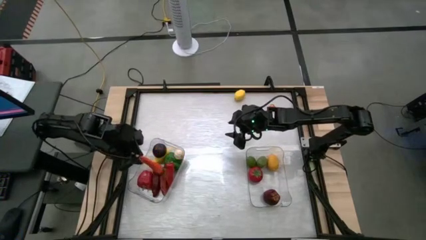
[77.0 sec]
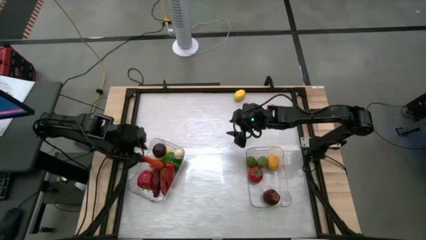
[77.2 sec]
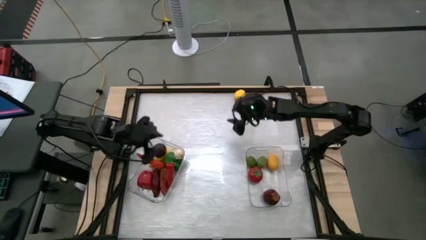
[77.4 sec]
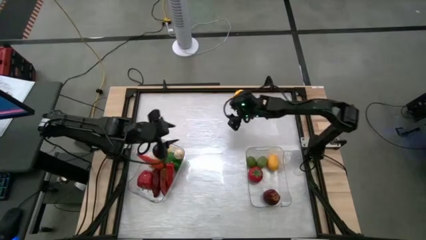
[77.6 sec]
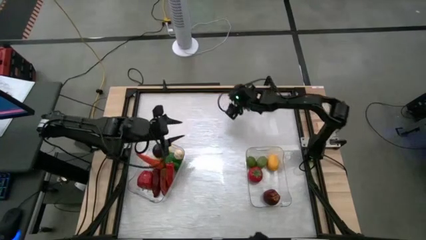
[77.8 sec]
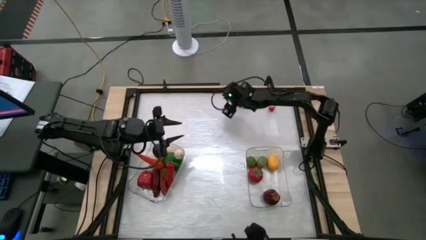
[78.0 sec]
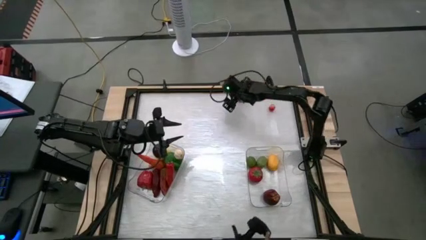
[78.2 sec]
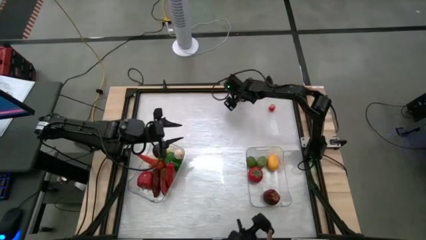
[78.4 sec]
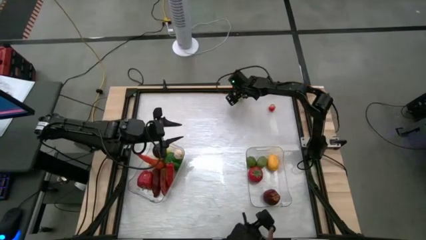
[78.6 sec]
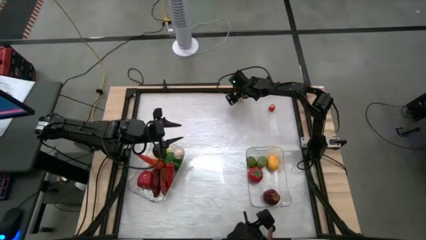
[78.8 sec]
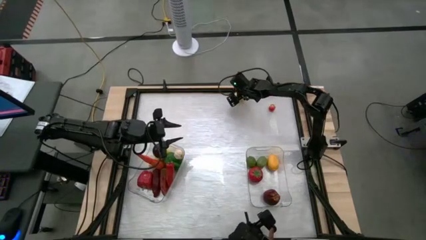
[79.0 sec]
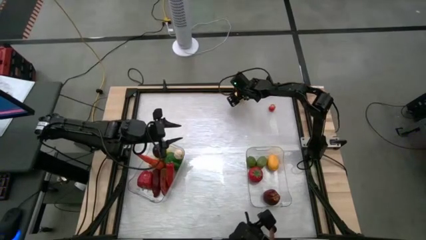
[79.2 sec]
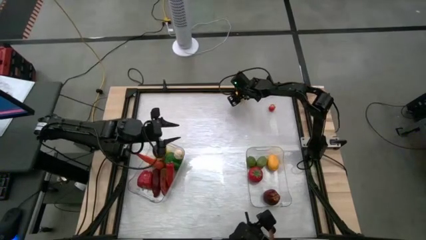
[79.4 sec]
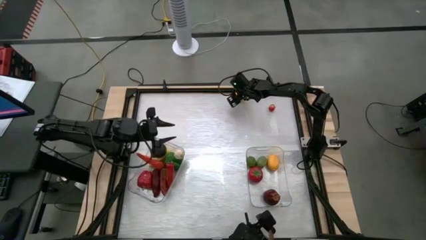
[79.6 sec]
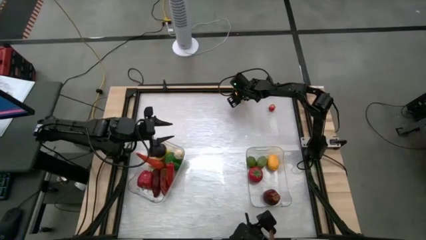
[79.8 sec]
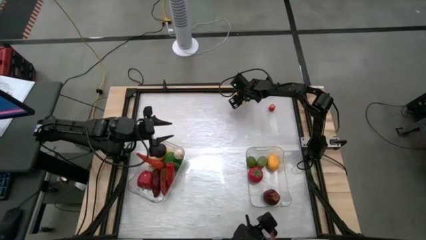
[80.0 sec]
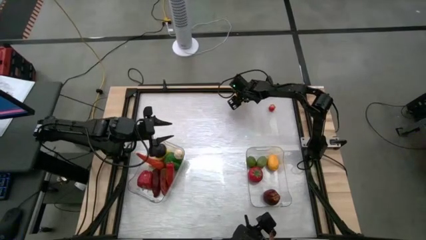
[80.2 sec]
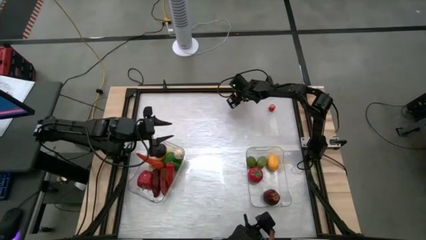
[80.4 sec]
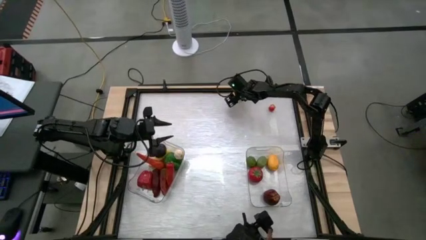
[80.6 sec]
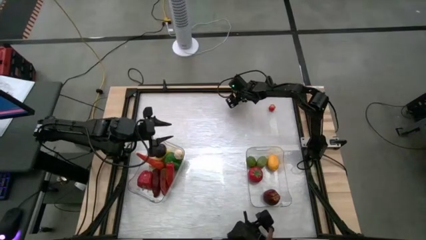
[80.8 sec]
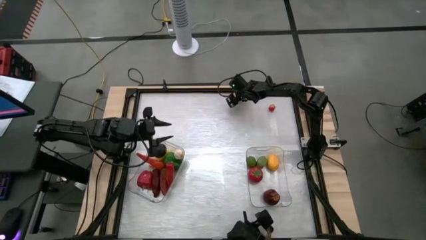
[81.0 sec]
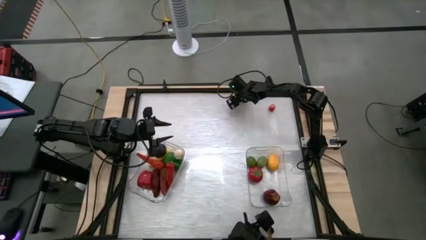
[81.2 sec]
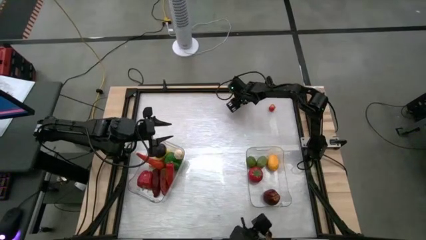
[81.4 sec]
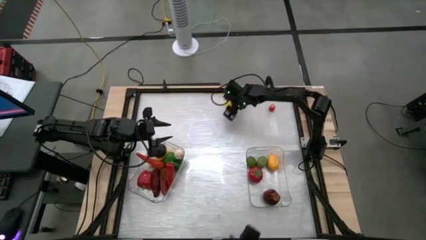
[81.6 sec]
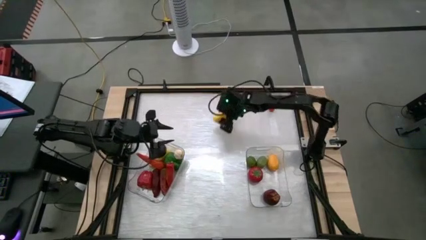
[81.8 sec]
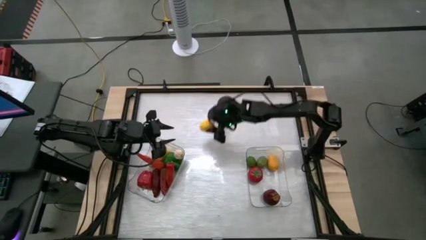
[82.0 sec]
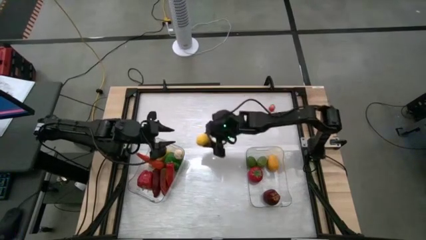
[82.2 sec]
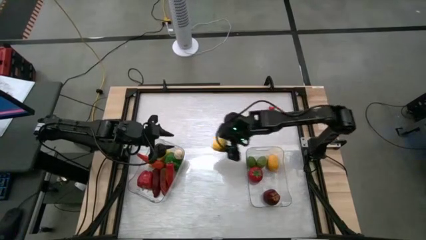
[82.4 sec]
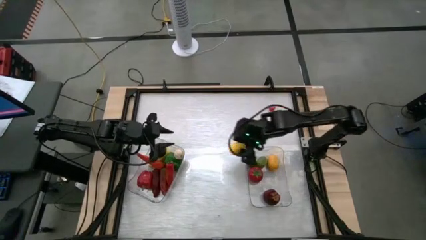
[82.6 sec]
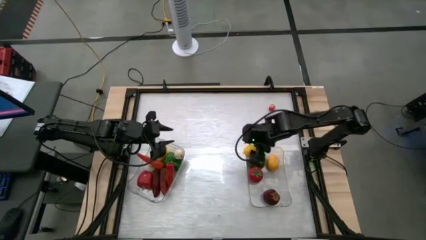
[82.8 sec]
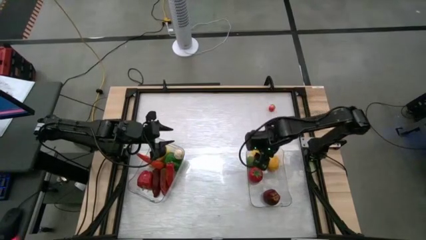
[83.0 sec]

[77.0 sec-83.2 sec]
Task: Sort produce into baskets
Put the yellow lemon into the right transparent bin

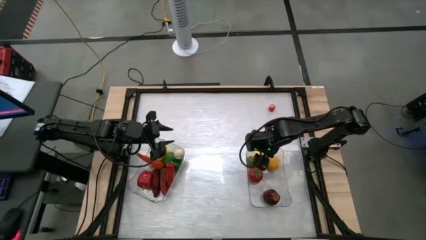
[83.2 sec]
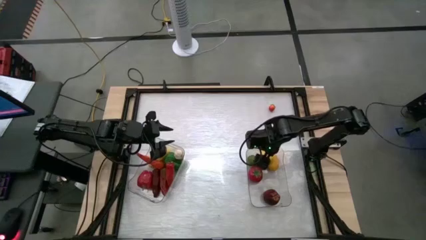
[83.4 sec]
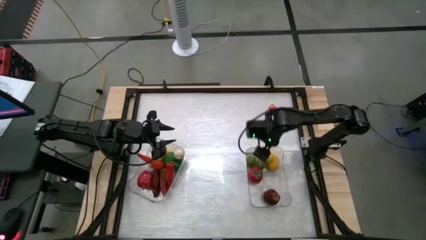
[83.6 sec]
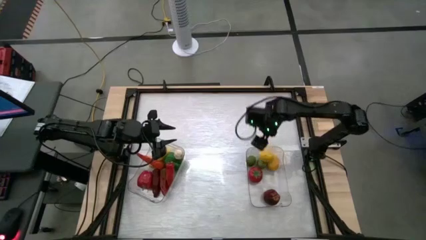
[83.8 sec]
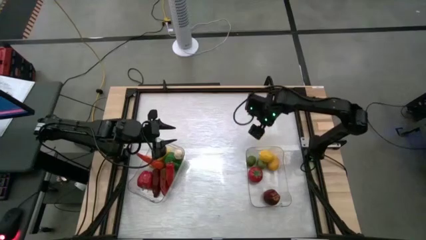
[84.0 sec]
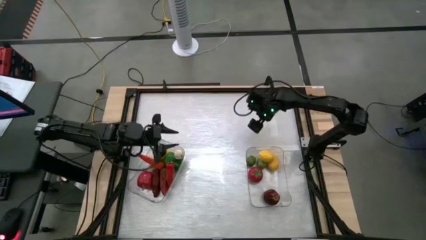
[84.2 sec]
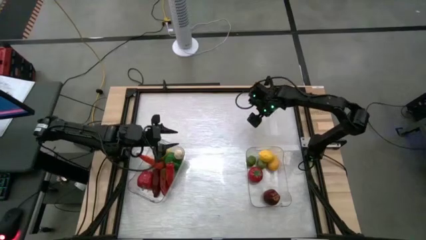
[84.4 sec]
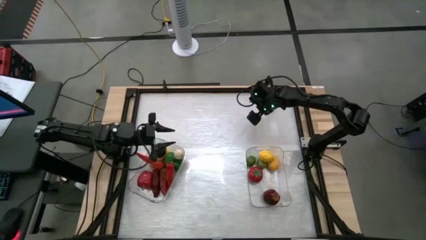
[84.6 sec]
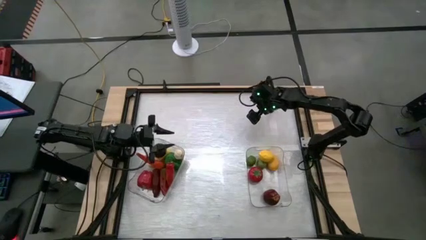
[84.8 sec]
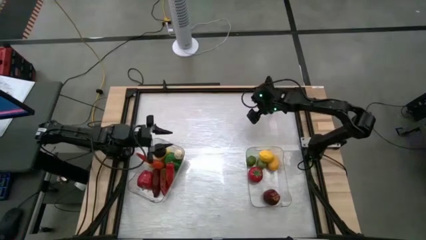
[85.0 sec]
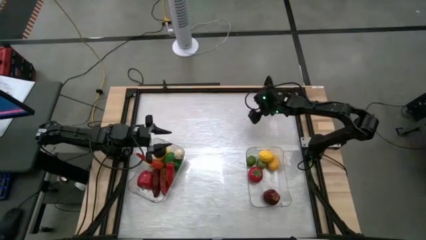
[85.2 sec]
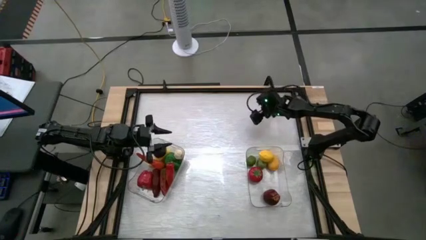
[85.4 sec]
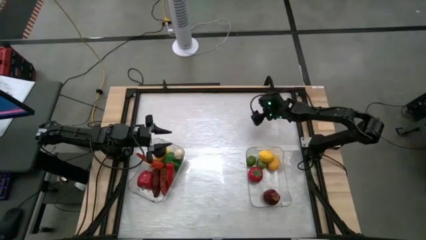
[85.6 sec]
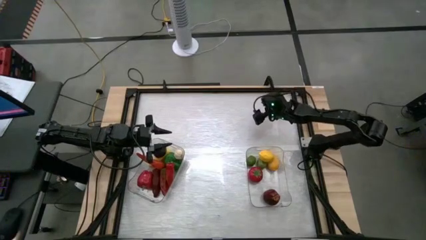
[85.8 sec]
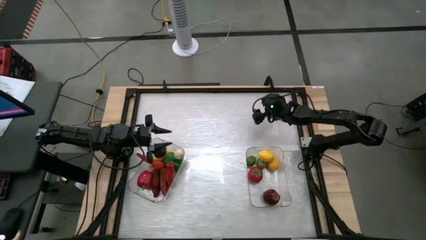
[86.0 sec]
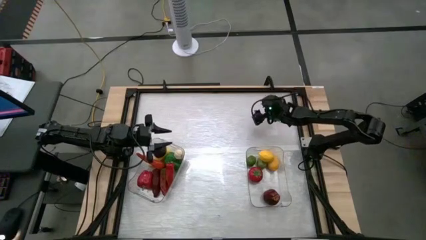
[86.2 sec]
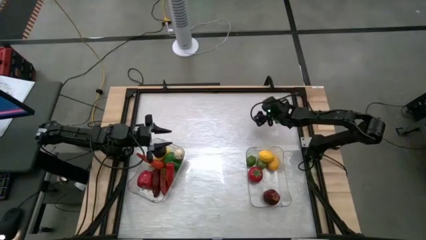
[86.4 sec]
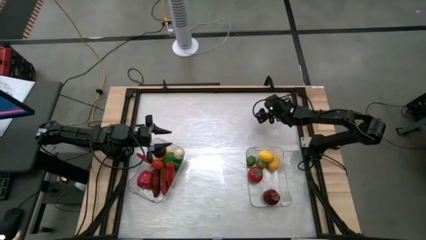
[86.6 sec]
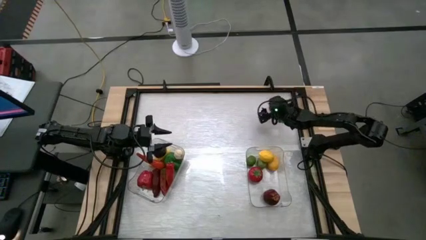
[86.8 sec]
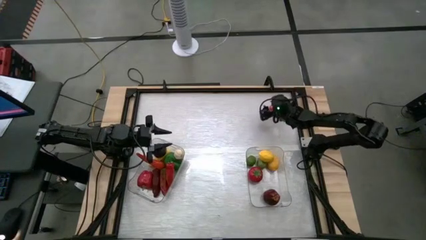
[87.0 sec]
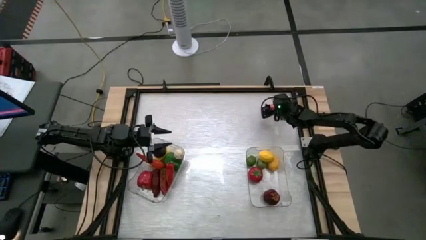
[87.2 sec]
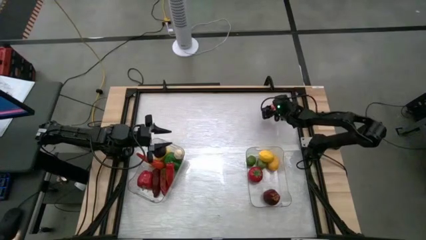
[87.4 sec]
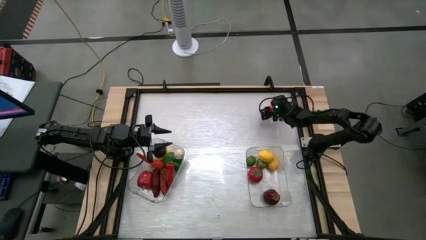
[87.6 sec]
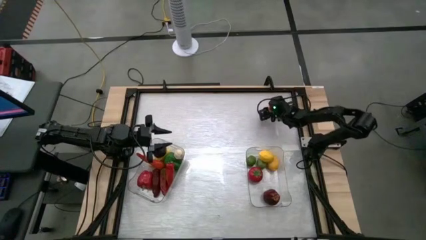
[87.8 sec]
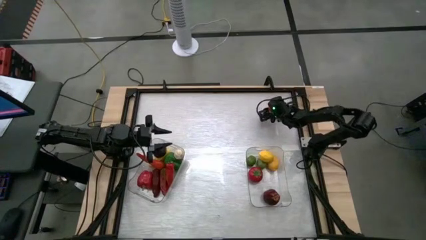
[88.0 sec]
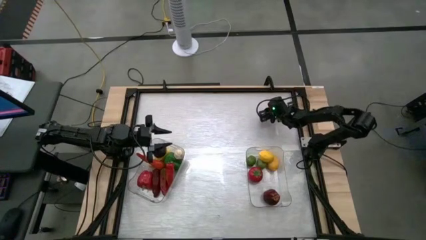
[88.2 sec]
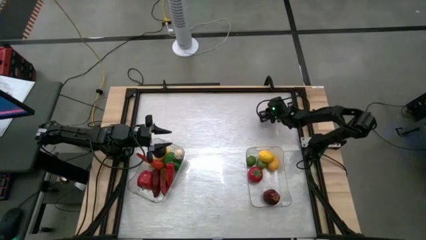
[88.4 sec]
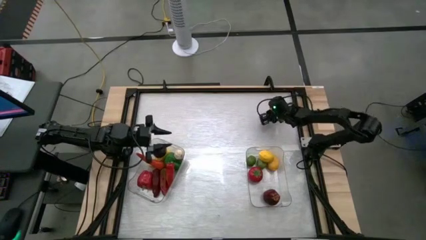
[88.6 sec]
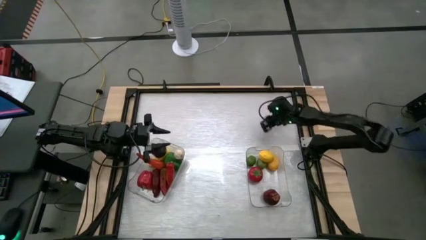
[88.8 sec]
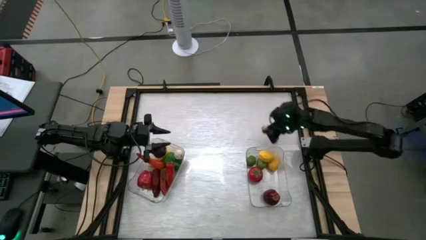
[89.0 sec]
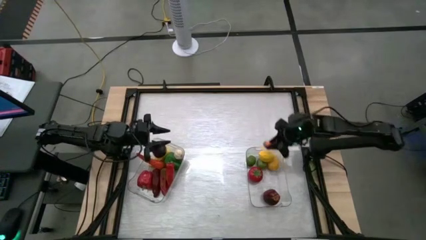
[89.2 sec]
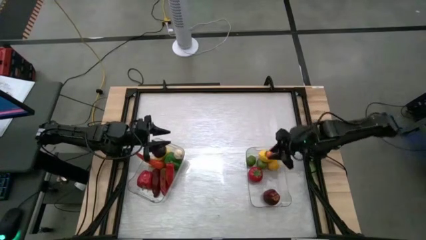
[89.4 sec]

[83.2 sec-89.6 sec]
Put the red peach into the right transparent bin

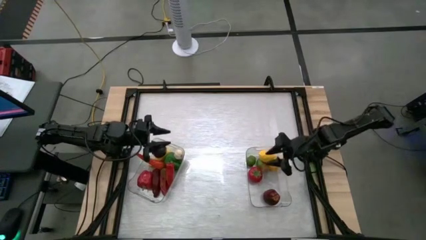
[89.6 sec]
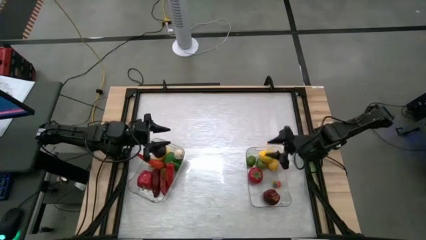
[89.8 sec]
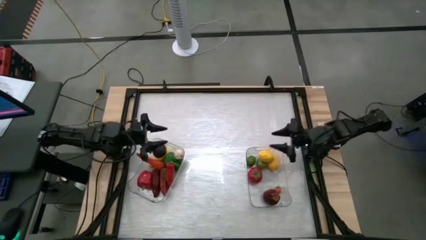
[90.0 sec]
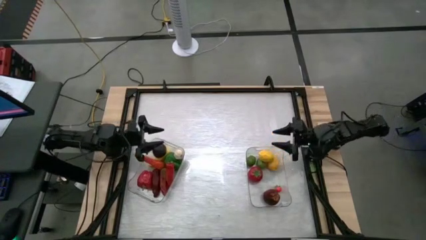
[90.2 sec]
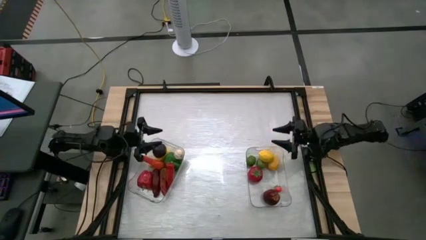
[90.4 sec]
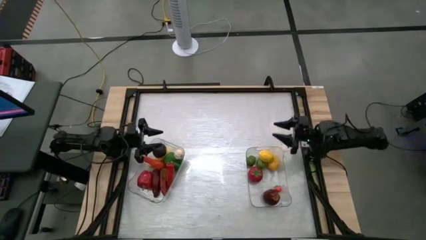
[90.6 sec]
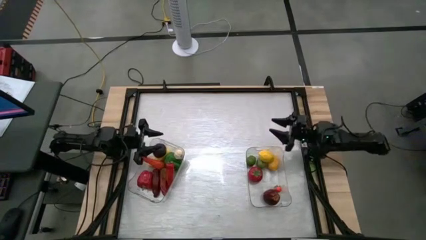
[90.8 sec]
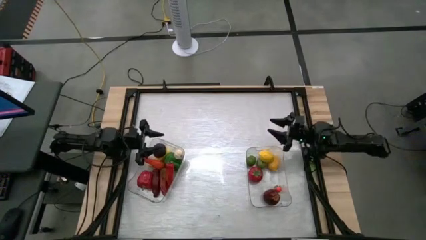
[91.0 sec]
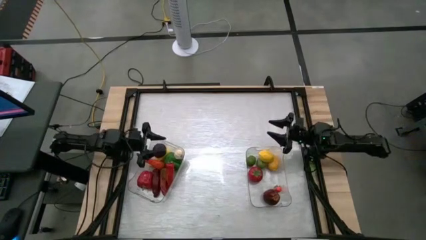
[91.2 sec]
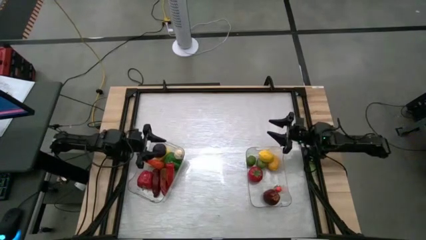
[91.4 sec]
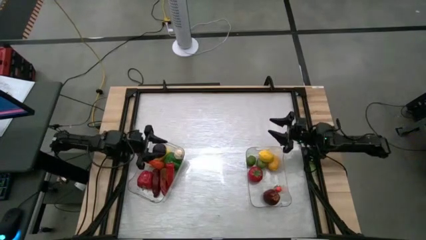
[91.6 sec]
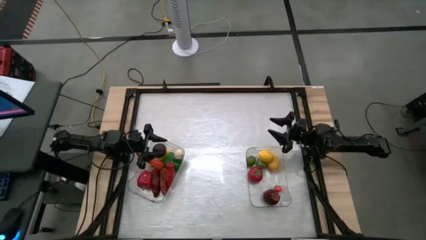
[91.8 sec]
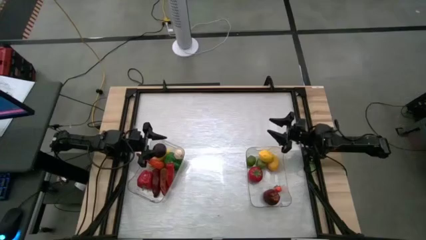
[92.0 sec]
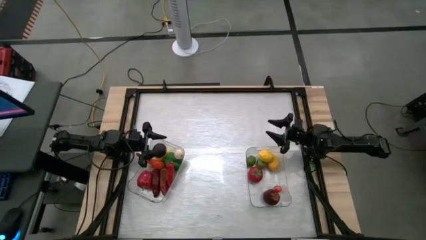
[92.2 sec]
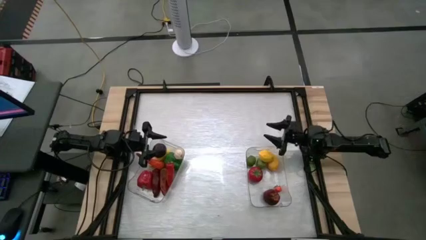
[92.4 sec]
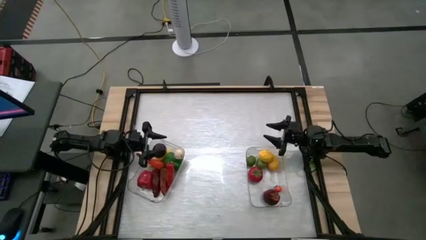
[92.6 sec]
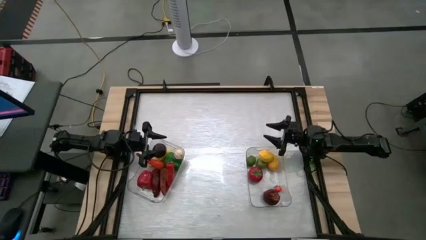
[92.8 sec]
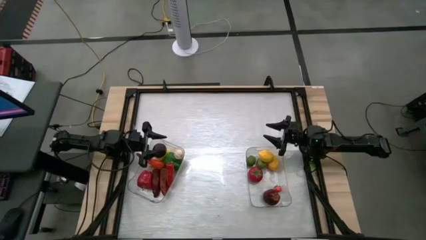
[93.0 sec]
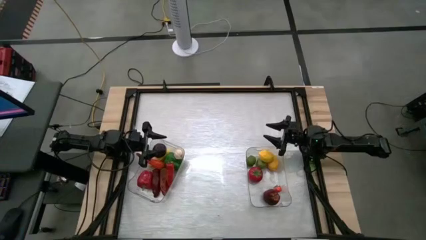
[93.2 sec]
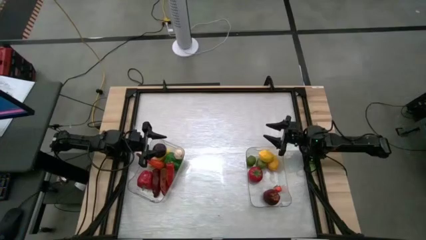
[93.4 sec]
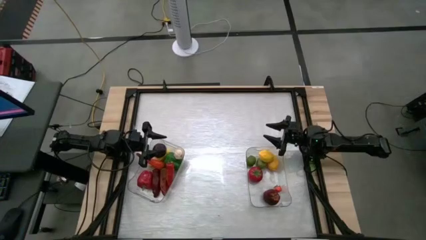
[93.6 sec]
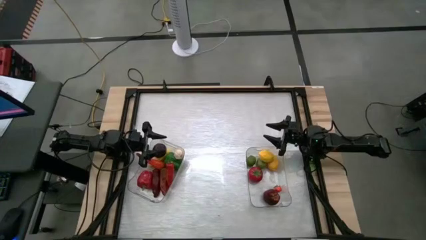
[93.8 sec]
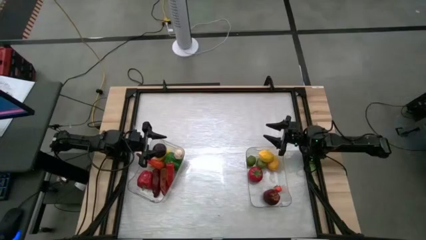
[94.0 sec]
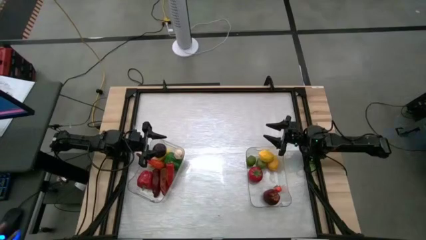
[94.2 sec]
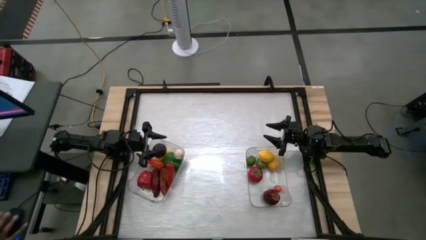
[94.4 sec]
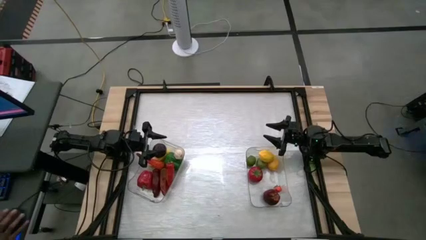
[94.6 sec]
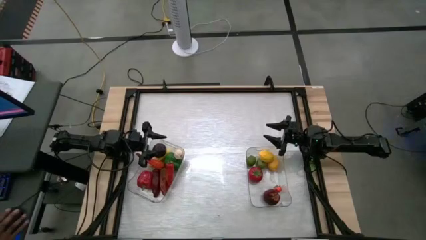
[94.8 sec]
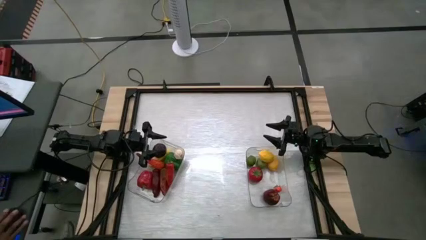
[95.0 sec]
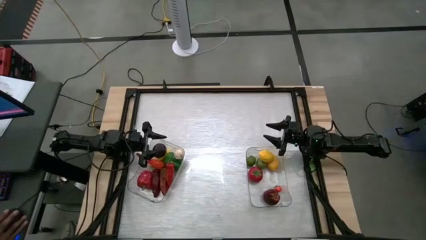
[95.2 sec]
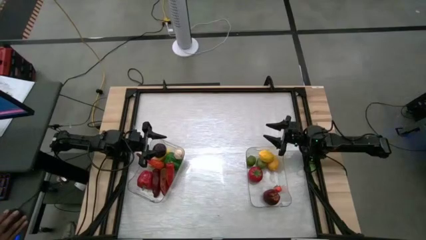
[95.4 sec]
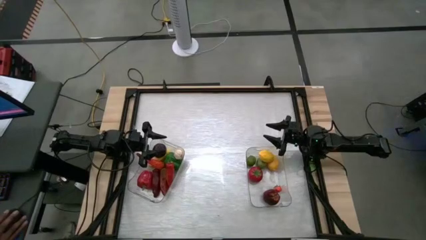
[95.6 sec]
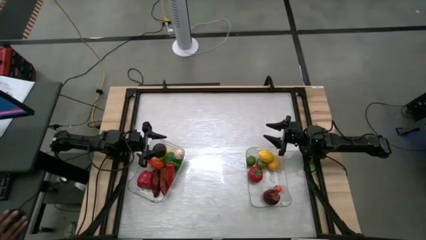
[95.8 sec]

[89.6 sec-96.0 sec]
Return to Home Position
